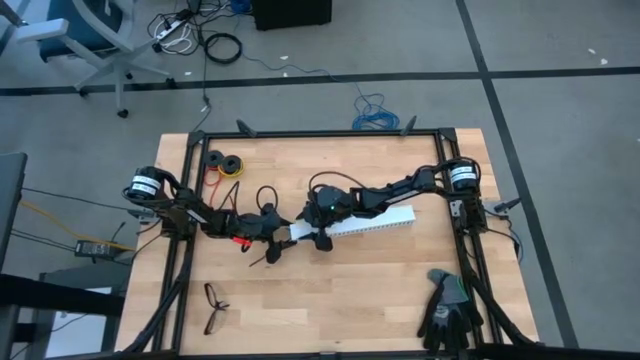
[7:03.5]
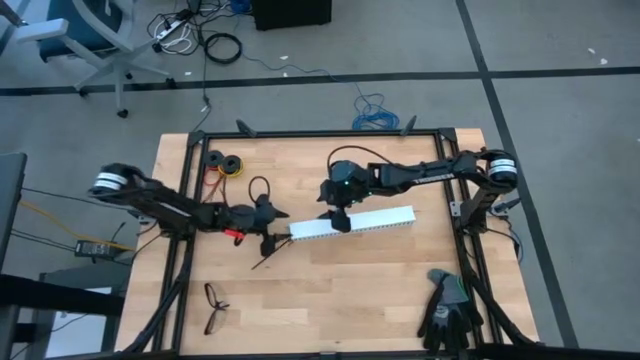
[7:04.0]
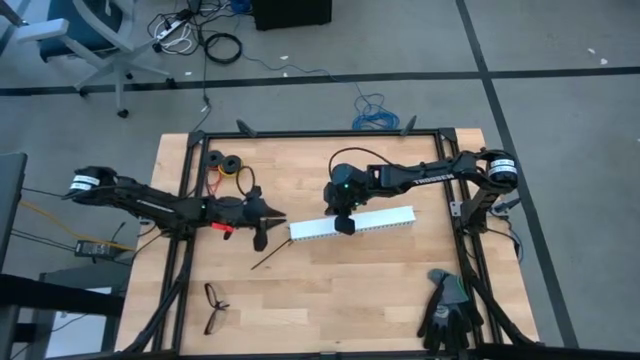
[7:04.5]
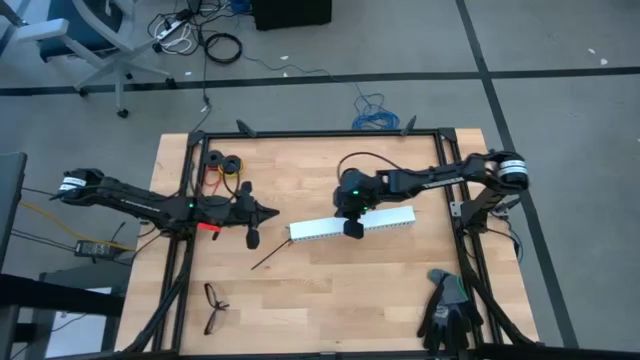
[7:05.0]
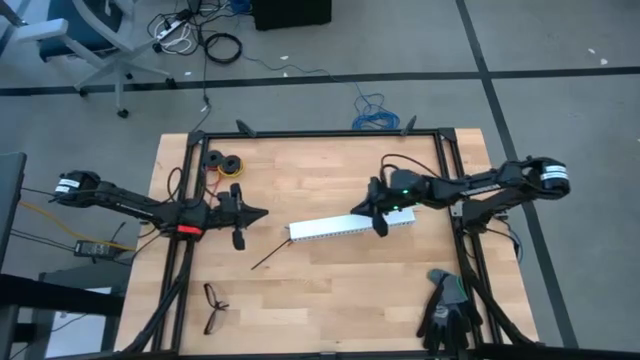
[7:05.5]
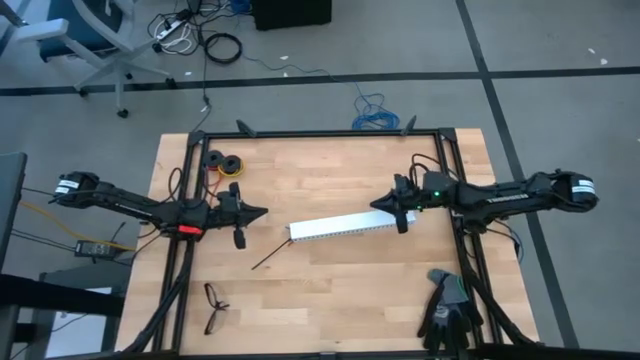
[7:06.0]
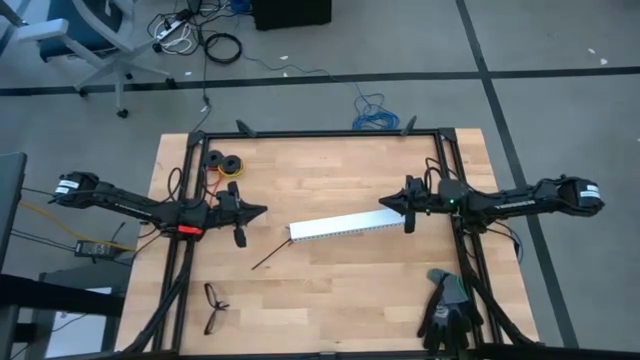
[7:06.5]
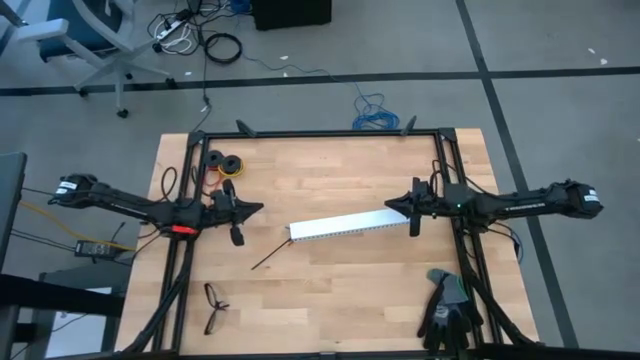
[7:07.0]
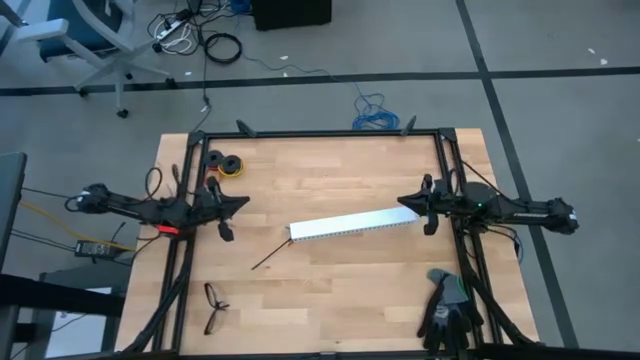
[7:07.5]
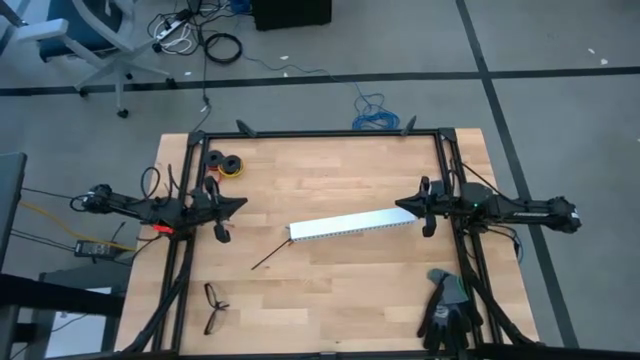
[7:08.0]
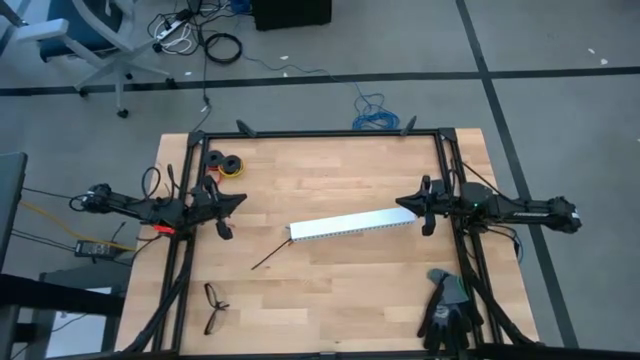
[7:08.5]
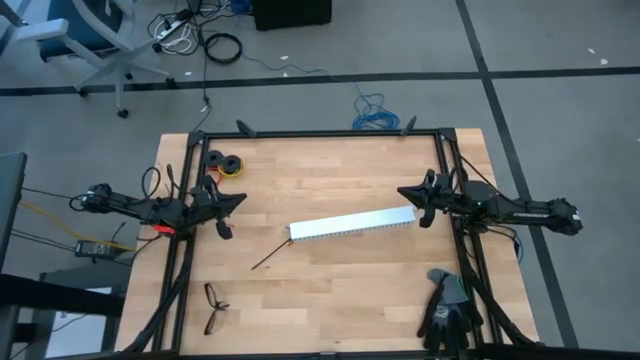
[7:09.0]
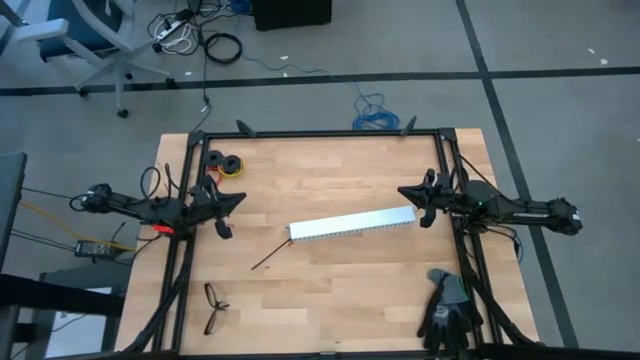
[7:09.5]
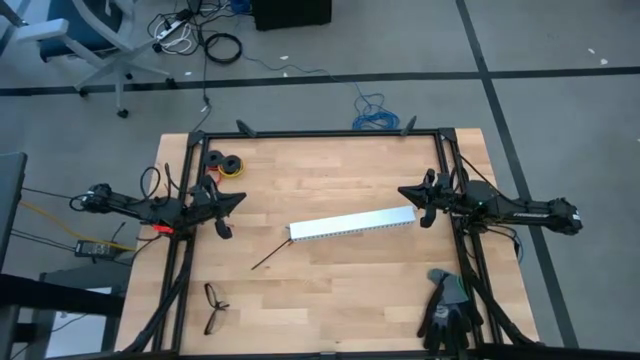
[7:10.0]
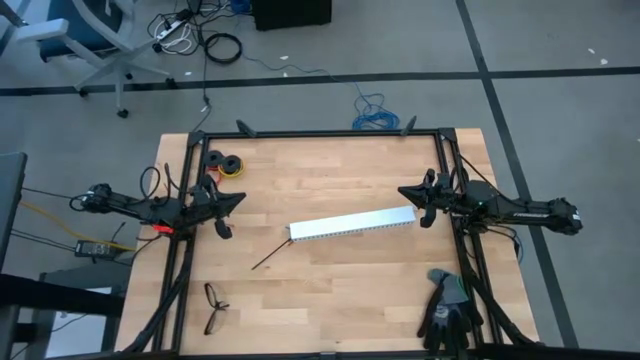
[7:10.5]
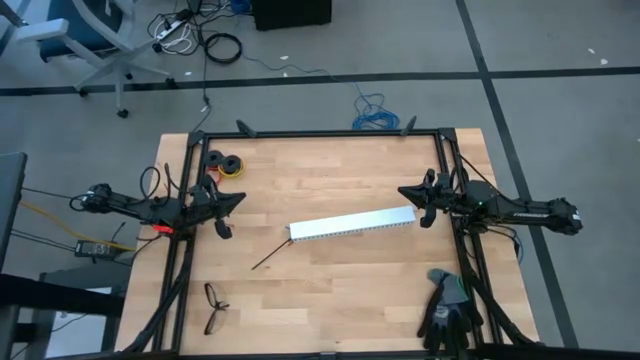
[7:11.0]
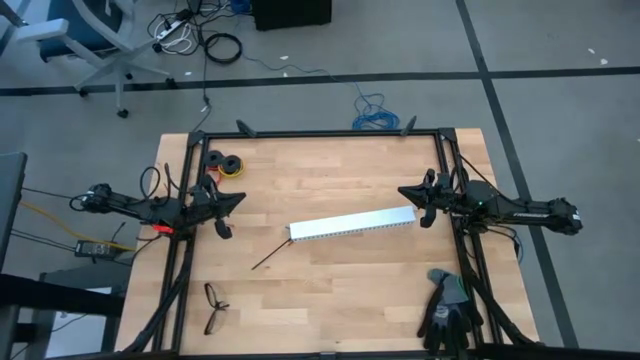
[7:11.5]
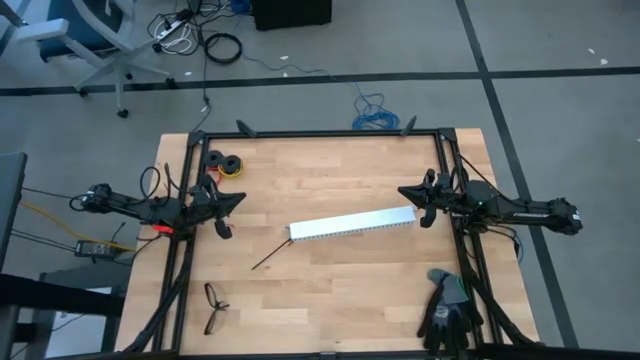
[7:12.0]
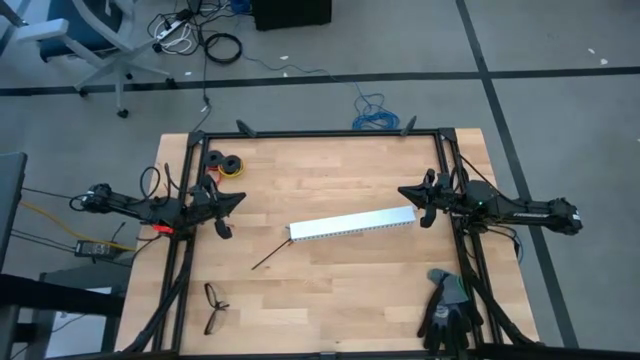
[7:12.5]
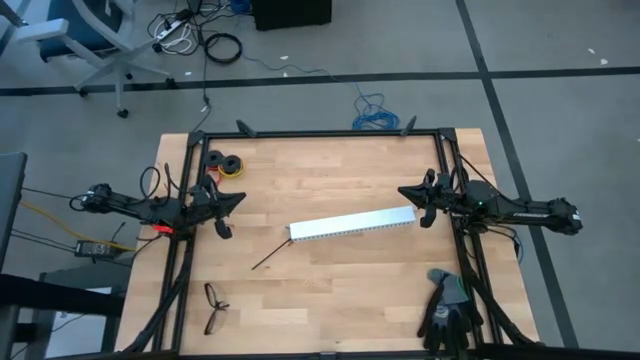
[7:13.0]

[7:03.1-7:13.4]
Task: Ziptie cables
Return to Home Position

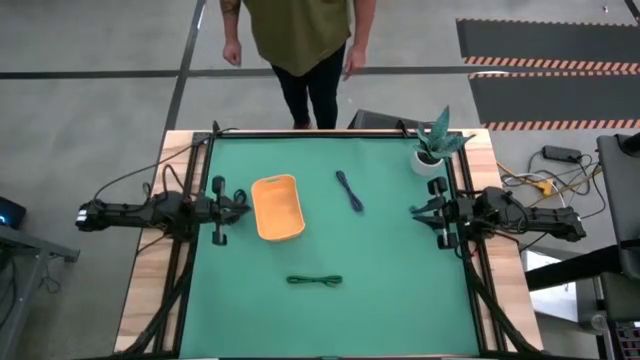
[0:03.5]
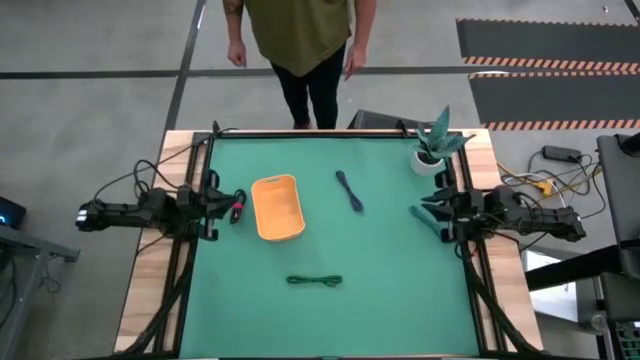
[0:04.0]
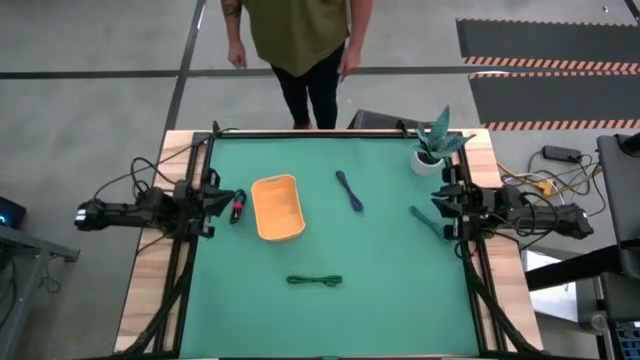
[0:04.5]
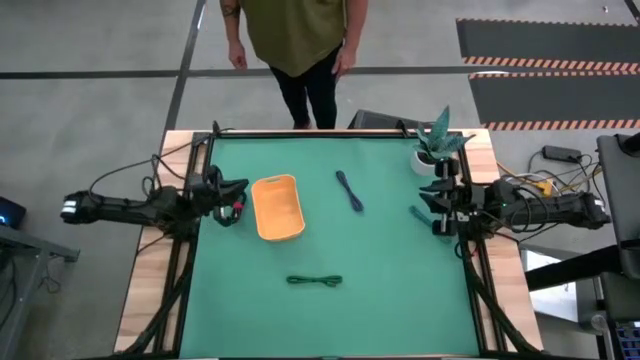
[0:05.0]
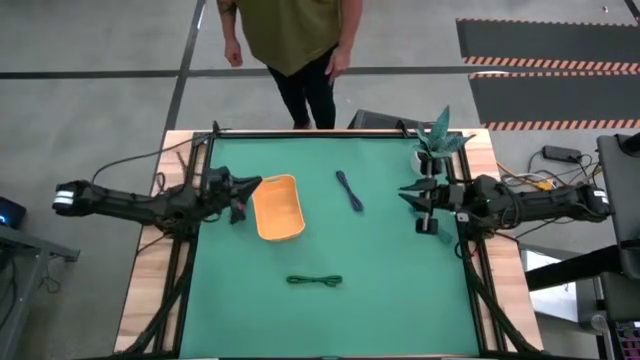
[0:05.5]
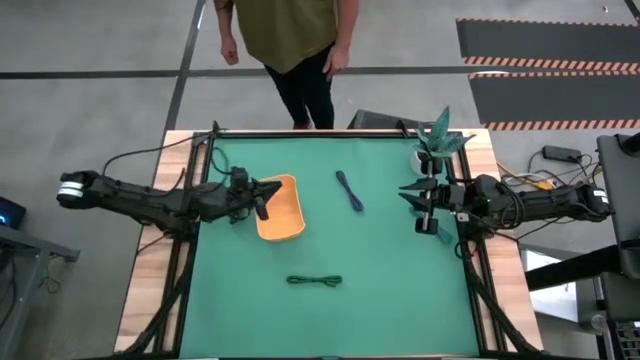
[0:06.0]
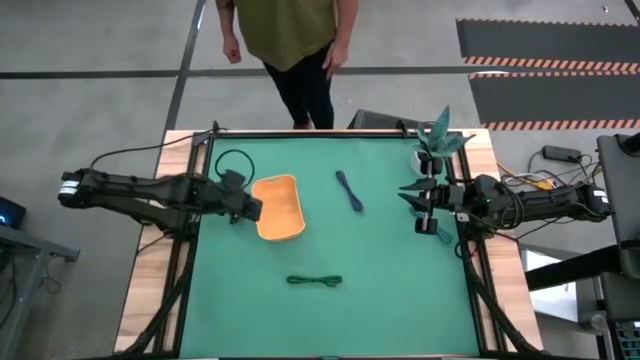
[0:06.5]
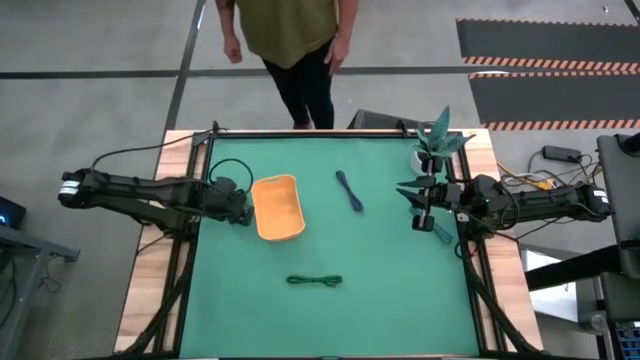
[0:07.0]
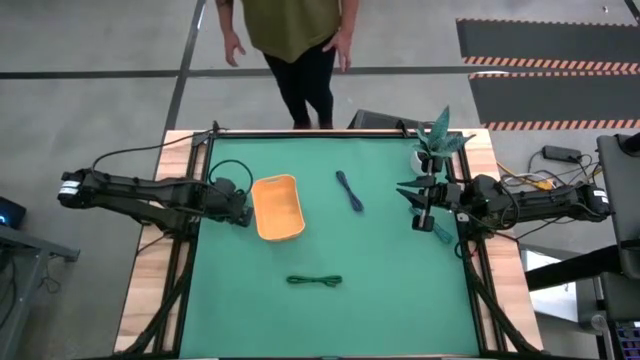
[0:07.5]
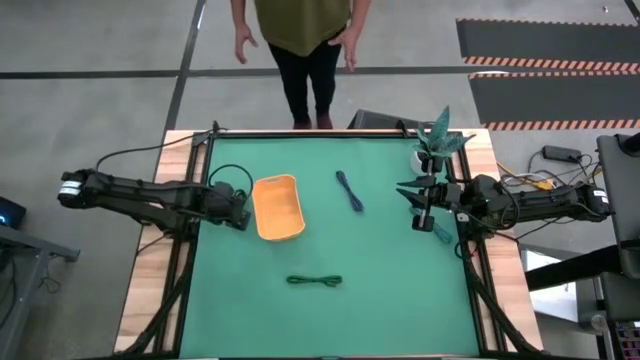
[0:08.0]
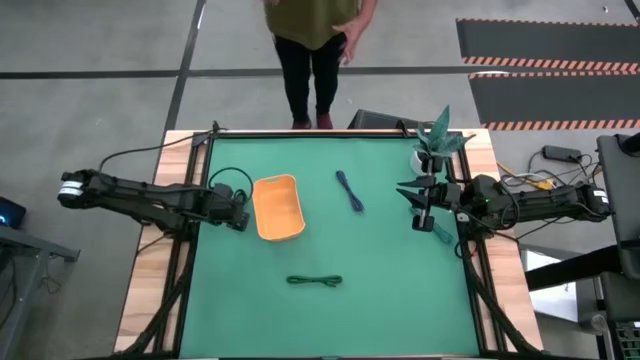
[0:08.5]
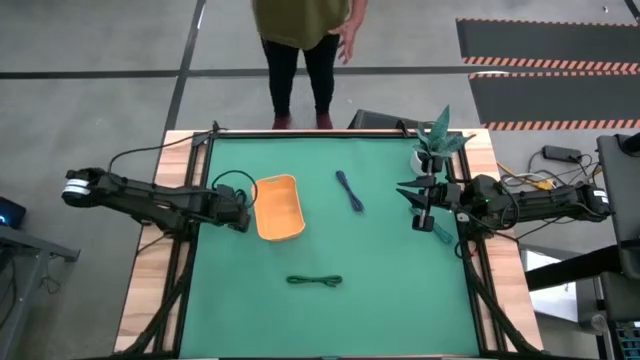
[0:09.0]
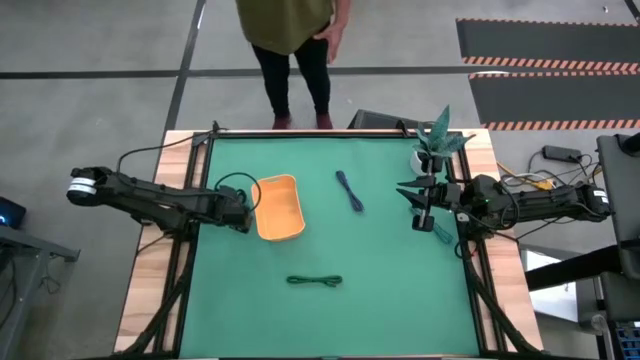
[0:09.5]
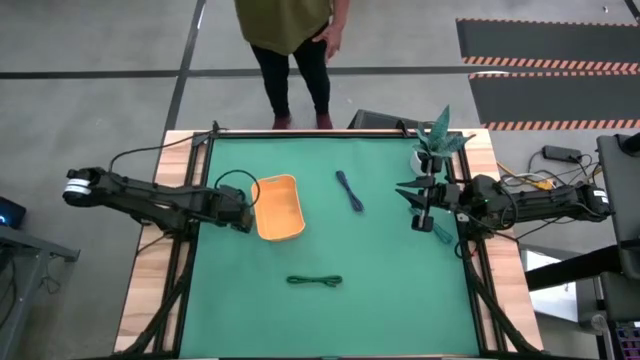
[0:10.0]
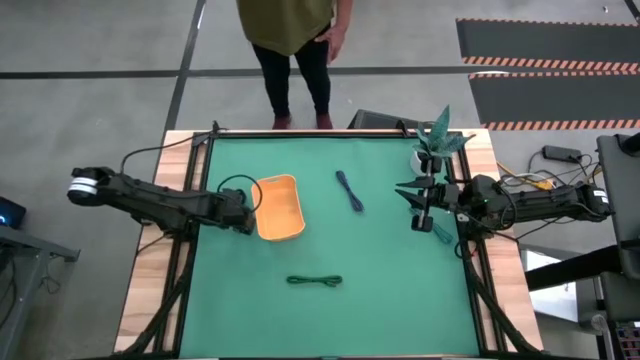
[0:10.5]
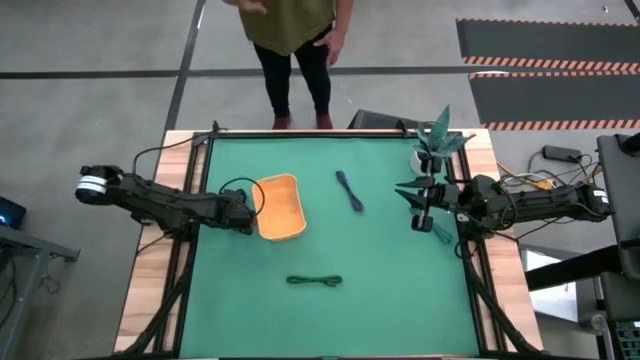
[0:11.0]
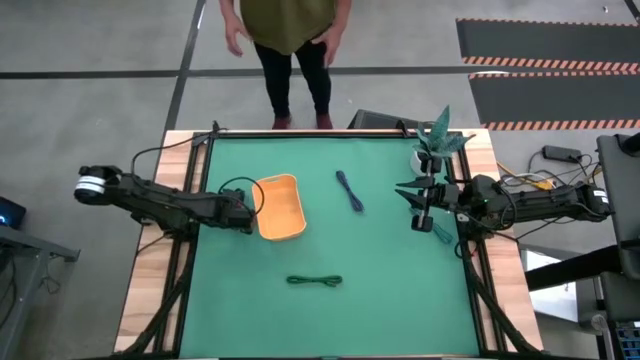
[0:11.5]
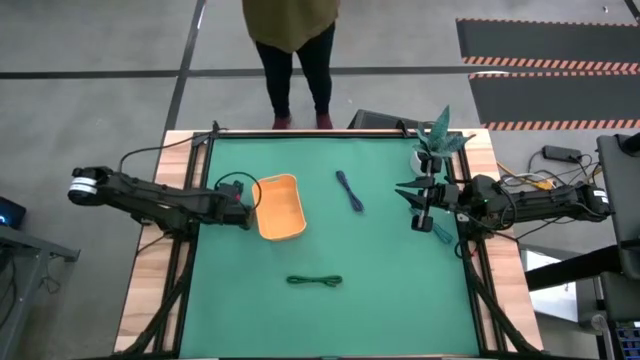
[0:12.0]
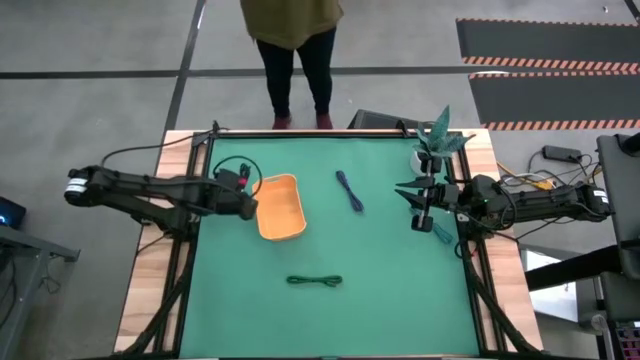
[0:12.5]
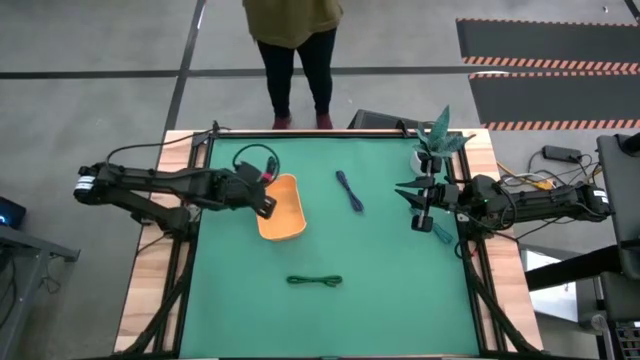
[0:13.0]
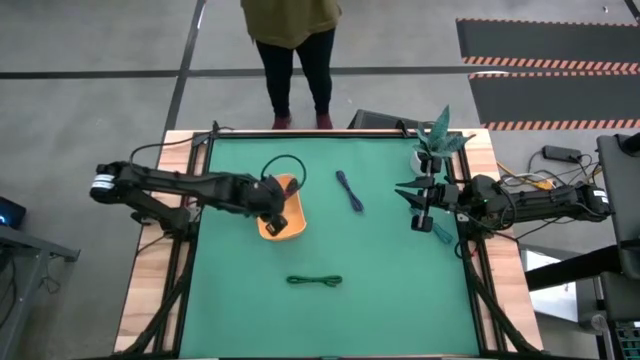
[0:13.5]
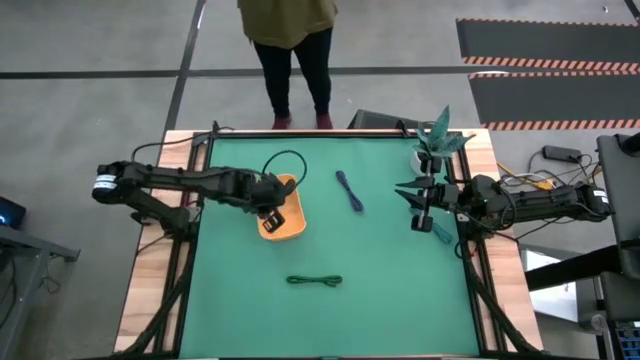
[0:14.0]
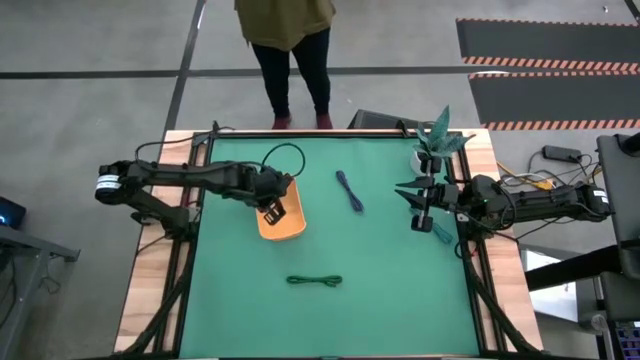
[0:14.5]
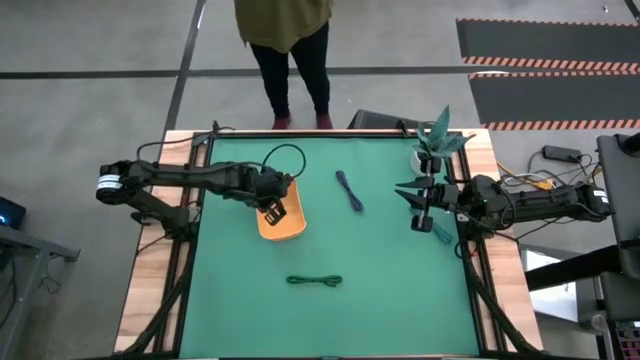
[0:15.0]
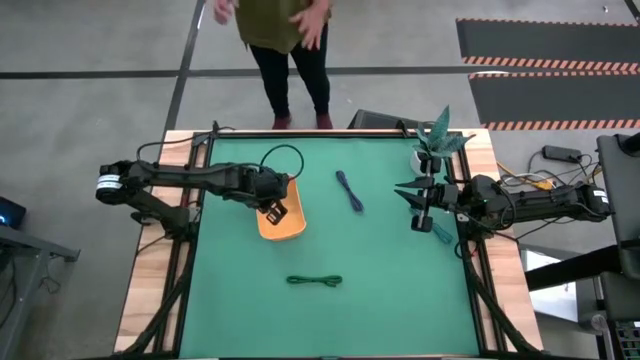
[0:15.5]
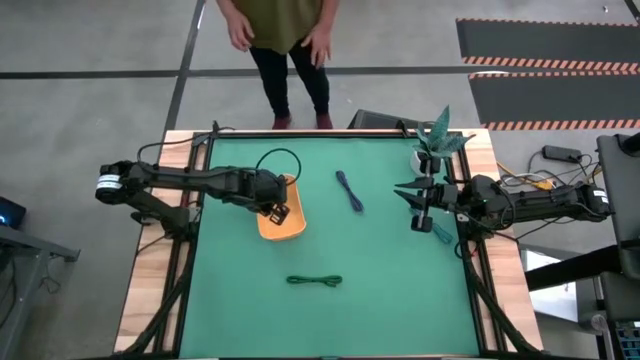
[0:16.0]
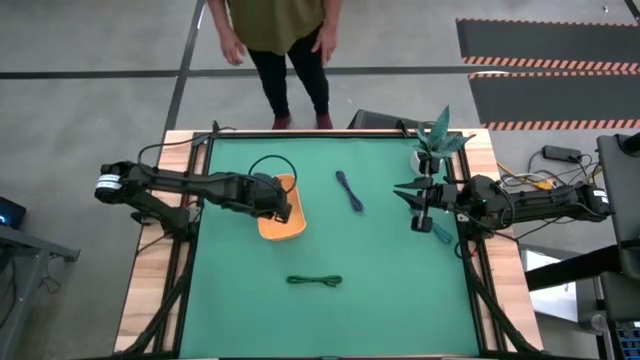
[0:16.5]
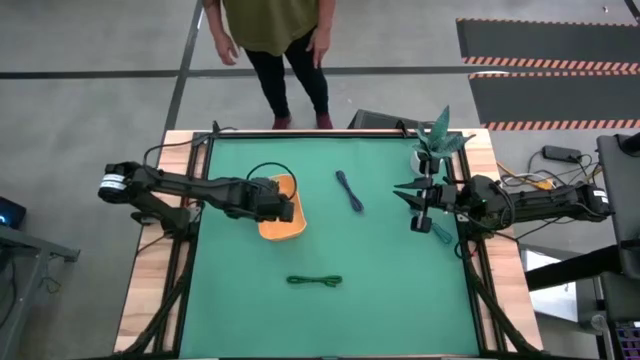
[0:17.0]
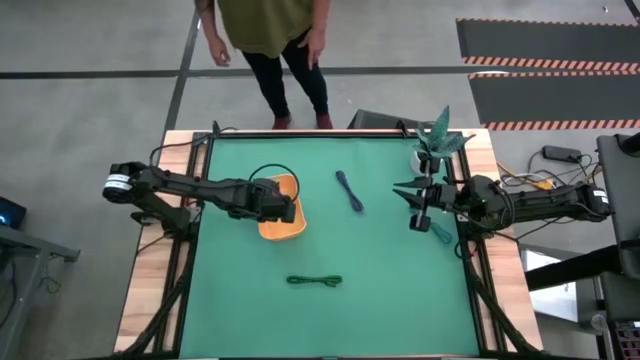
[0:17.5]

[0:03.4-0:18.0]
Task: Pick and place USB-C Cables
Put the black USB cable into the orange bin
